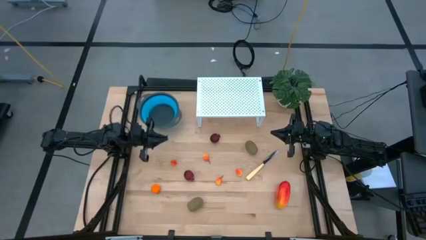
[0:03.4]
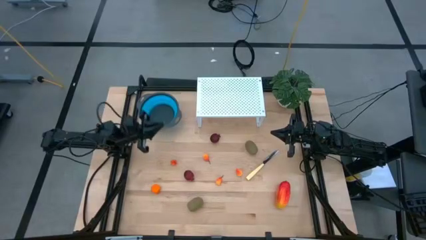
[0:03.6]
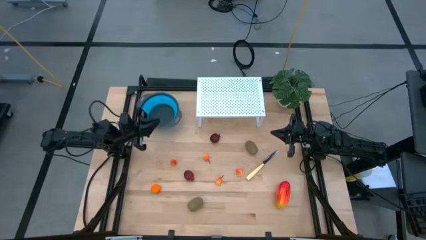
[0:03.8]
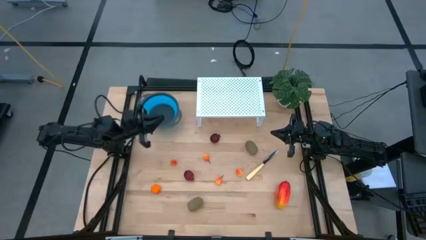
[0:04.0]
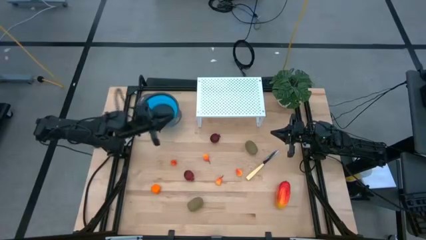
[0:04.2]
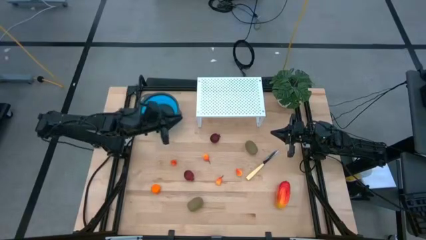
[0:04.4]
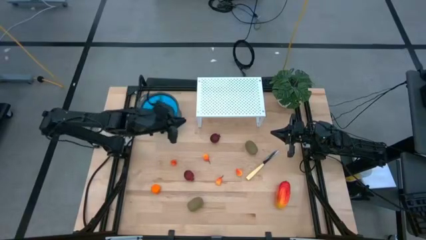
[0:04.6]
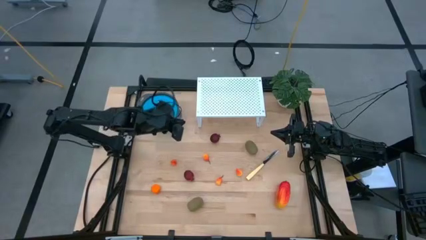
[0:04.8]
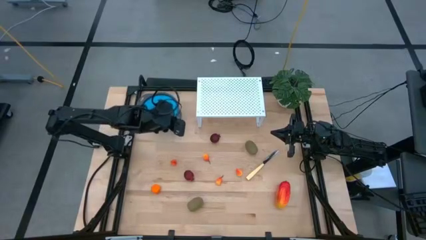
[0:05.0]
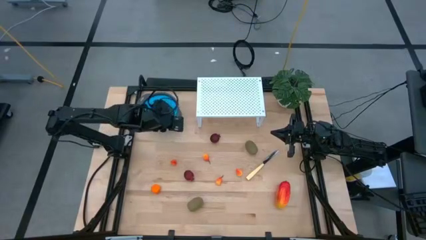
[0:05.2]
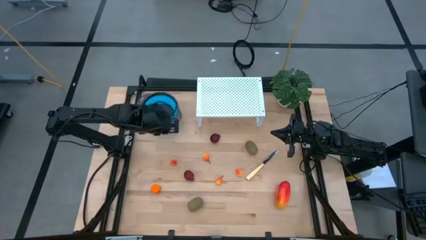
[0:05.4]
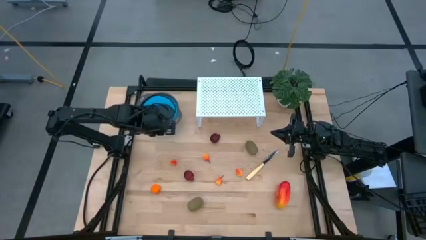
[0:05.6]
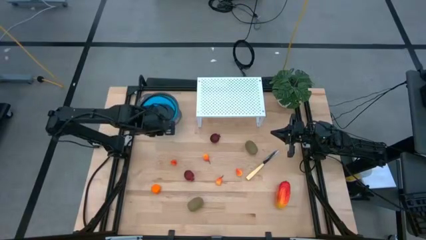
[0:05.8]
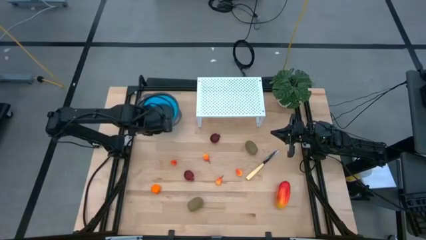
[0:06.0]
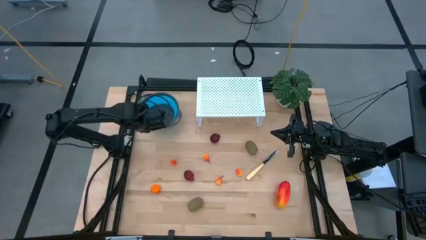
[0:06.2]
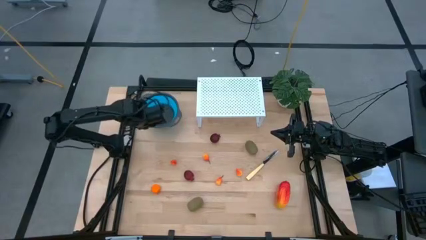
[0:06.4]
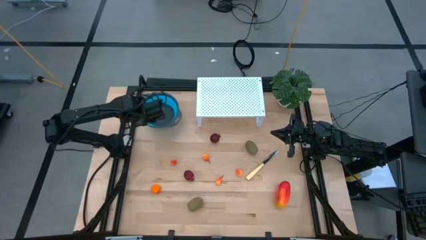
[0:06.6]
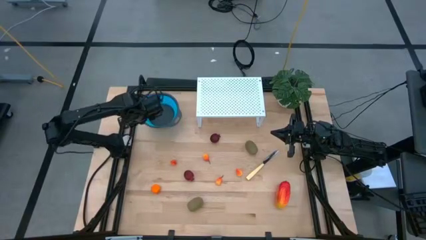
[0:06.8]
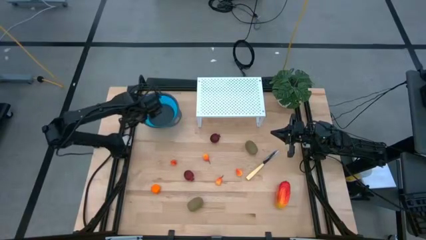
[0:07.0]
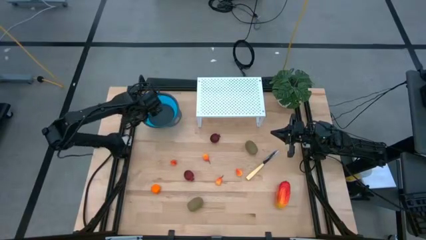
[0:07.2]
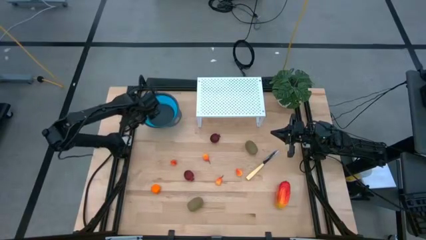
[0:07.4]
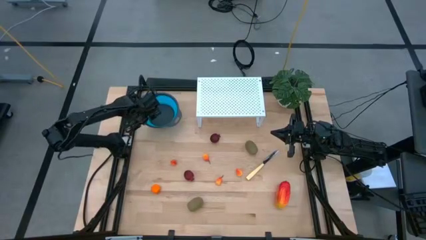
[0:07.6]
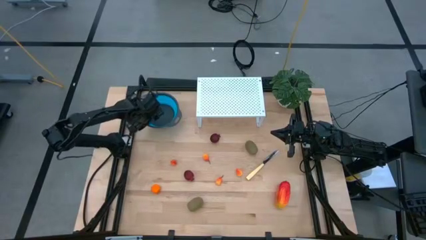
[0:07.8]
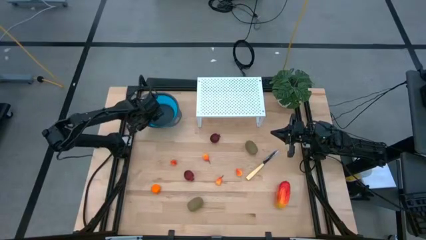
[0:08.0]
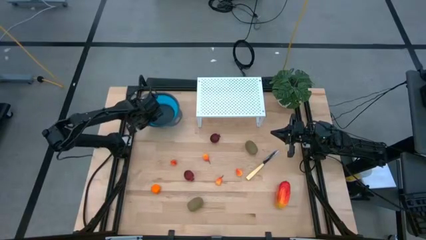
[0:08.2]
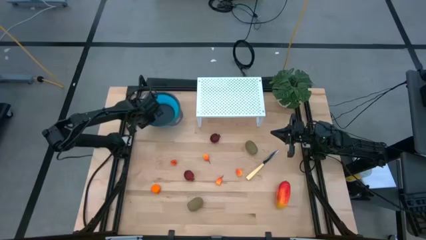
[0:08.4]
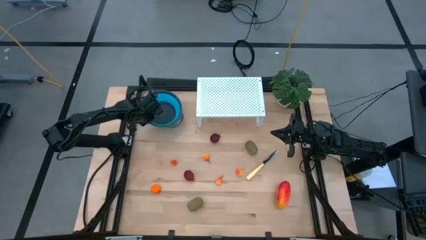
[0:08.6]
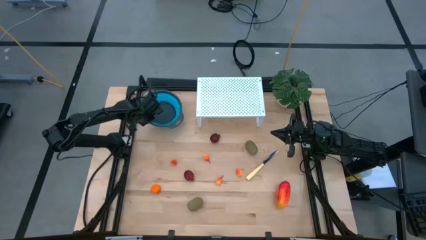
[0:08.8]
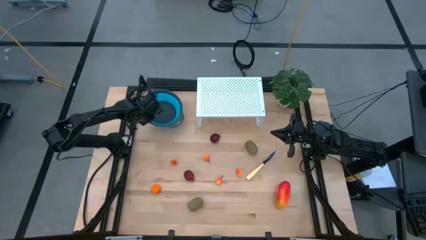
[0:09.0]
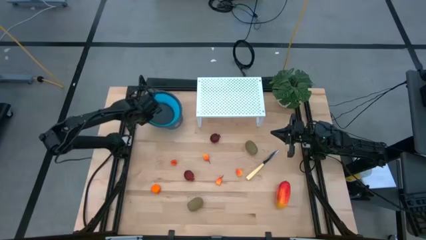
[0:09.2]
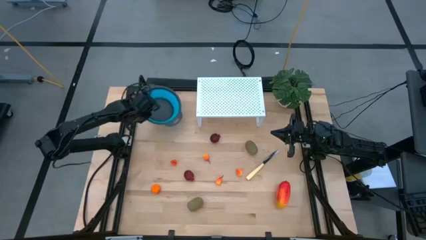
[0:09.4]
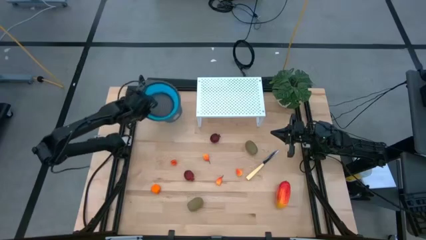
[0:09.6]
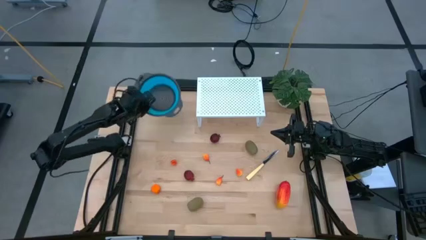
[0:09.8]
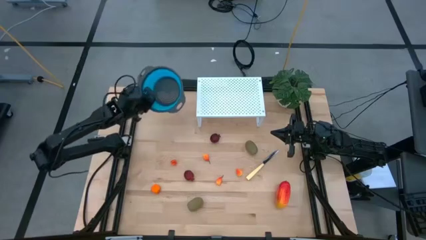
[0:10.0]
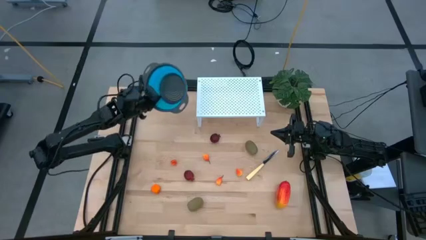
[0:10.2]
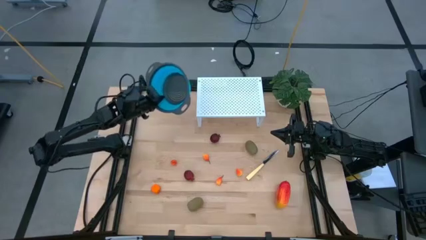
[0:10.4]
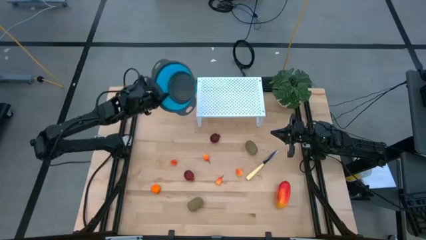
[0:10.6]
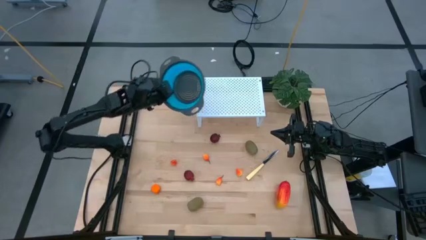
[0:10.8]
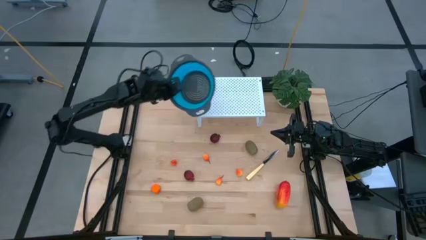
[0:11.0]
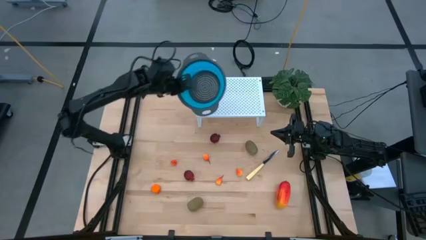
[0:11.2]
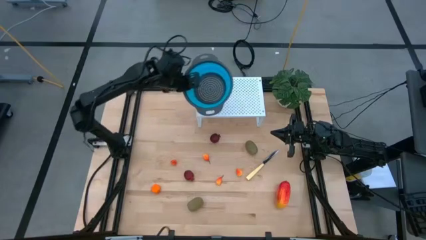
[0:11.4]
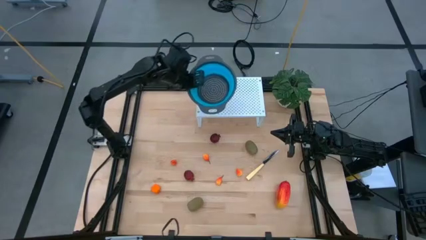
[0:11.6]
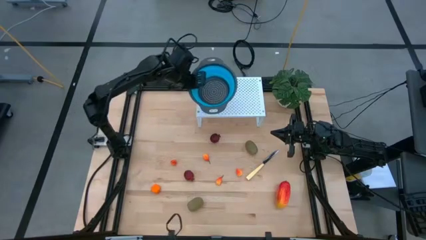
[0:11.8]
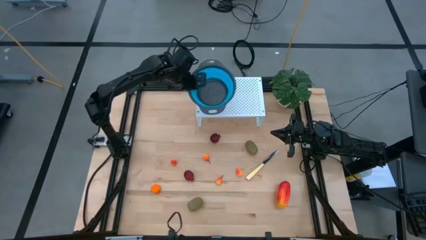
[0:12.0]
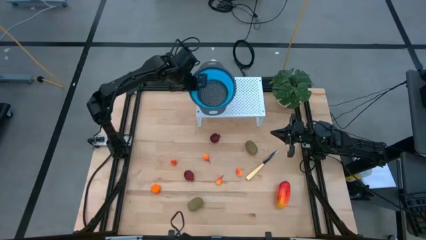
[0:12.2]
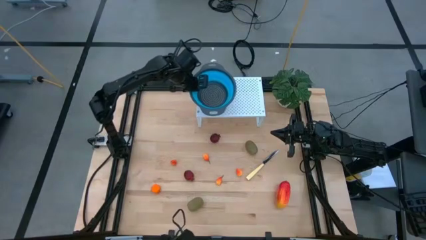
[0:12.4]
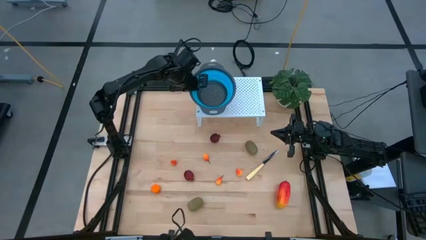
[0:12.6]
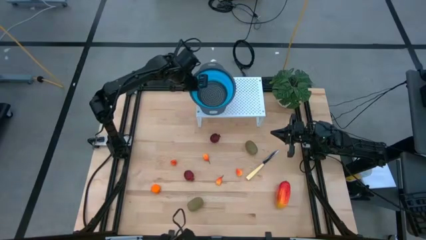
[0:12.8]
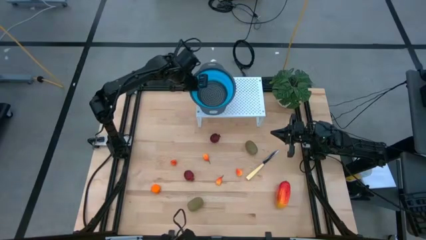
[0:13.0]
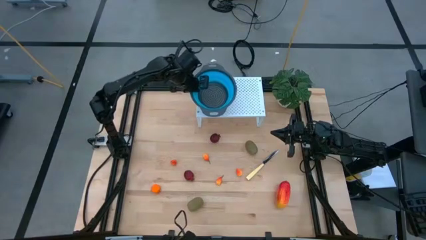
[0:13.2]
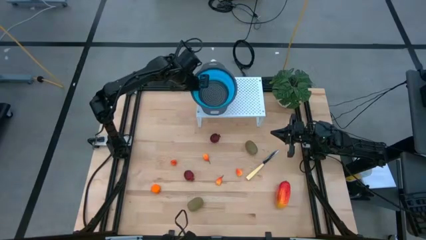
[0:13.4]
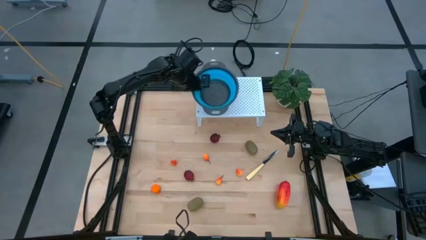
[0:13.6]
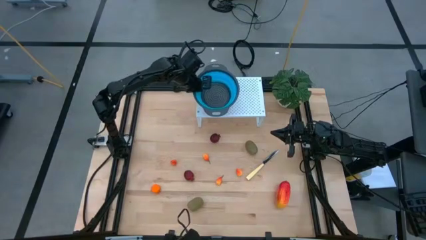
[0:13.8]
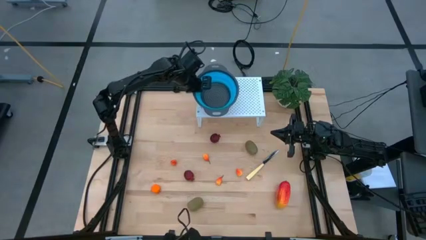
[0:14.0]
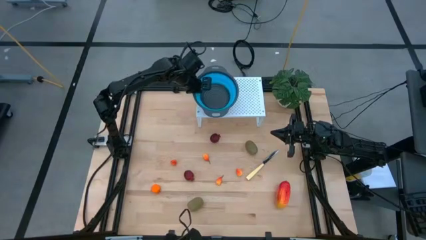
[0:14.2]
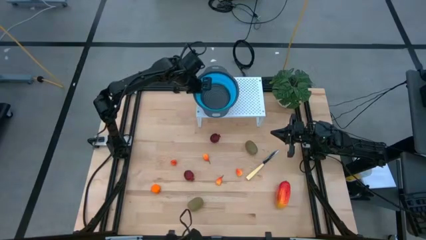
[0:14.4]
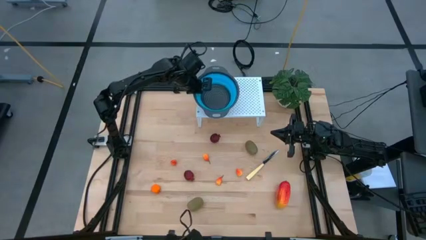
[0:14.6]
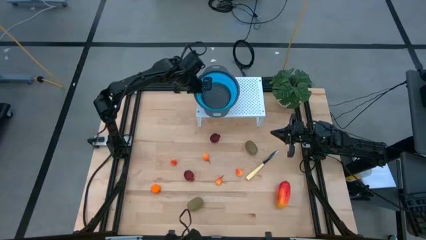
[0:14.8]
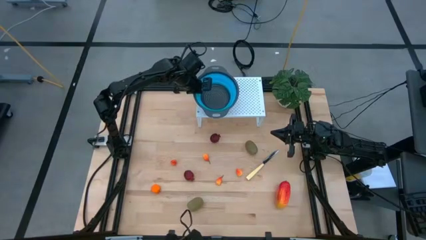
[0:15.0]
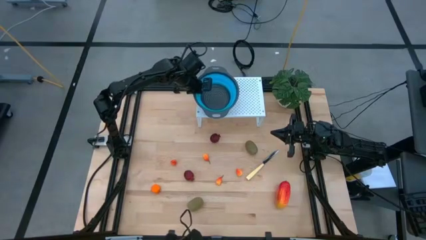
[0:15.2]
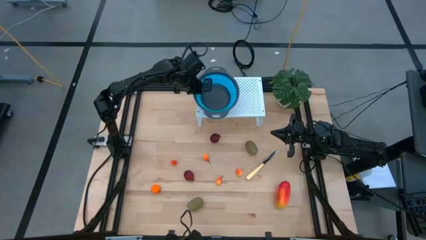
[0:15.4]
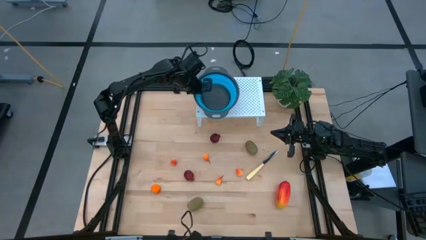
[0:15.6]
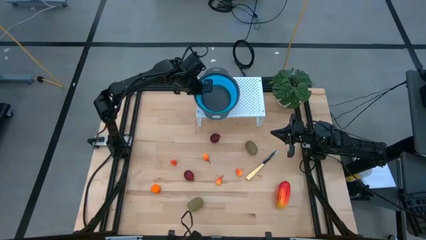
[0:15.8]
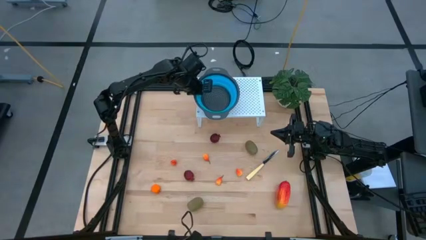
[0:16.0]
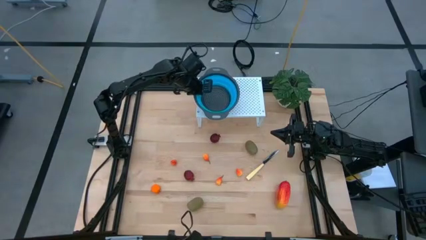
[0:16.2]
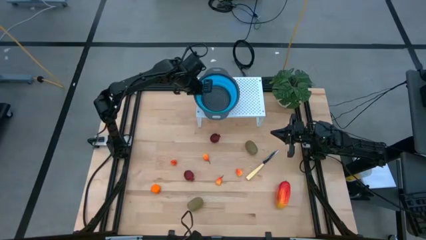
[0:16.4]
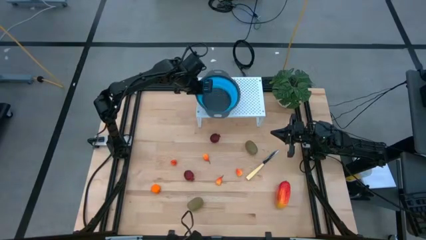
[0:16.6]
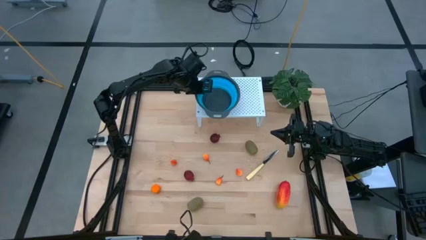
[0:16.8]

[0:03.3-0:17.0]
Task: Pick & Place Fruit
Put the blue strainer bowl on the shelf
